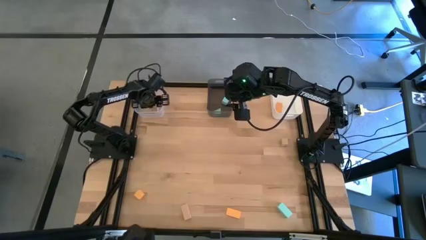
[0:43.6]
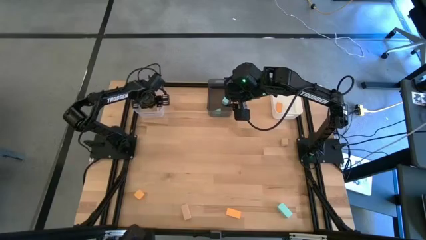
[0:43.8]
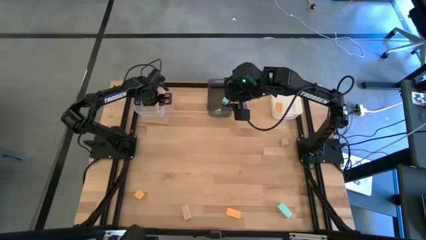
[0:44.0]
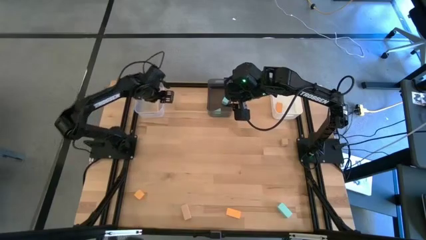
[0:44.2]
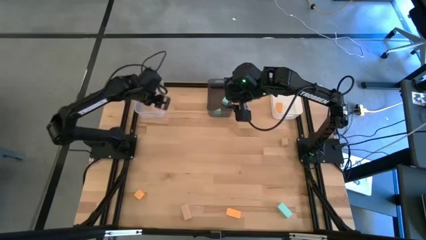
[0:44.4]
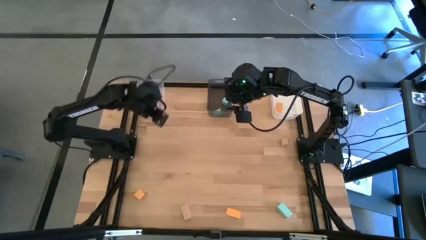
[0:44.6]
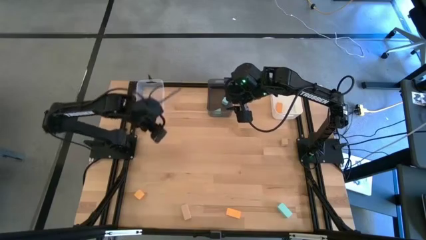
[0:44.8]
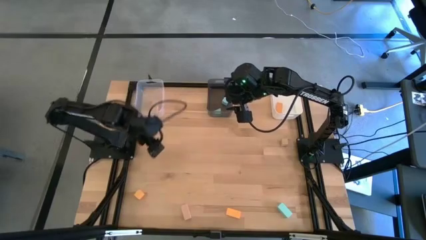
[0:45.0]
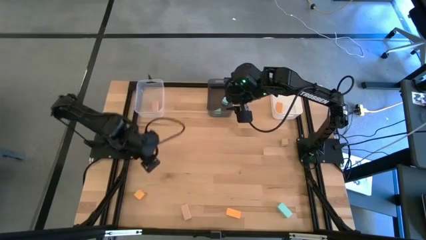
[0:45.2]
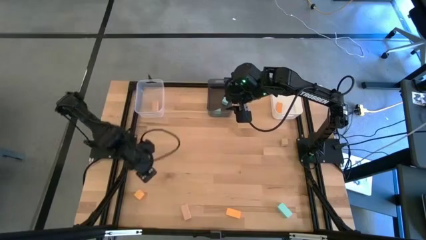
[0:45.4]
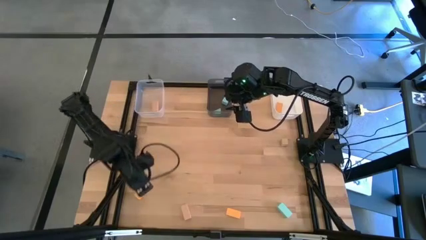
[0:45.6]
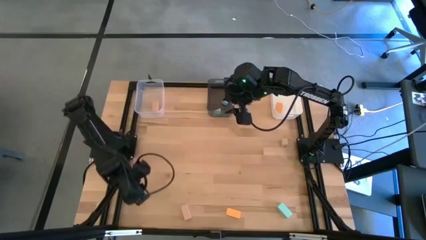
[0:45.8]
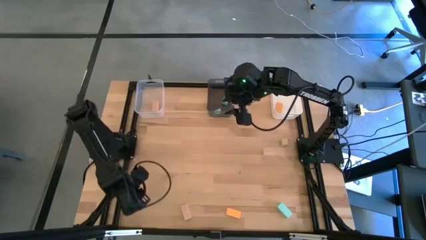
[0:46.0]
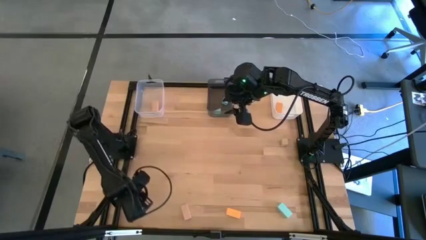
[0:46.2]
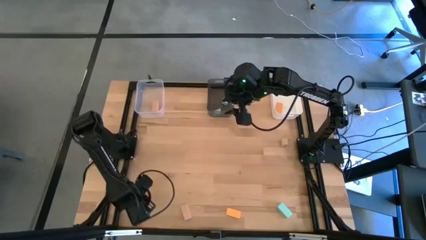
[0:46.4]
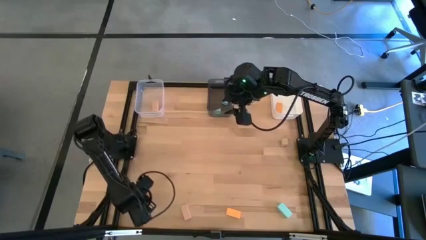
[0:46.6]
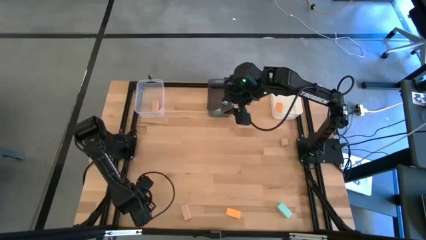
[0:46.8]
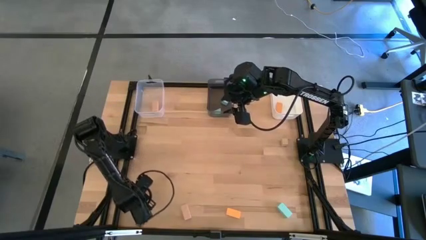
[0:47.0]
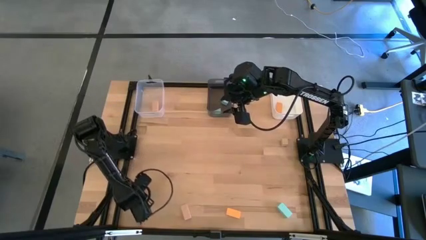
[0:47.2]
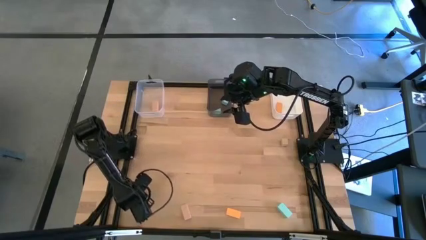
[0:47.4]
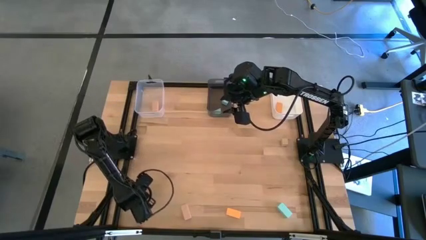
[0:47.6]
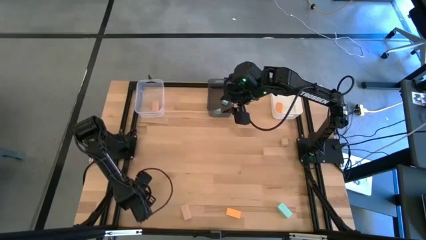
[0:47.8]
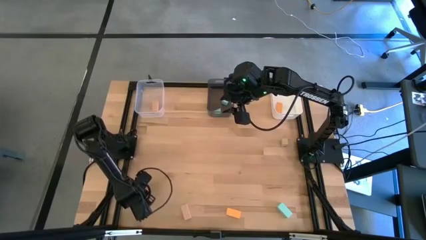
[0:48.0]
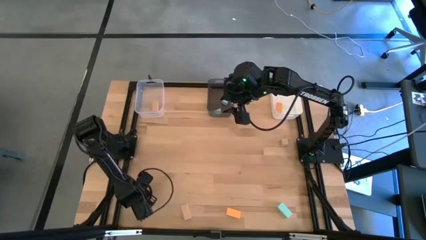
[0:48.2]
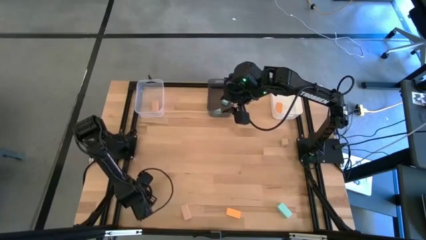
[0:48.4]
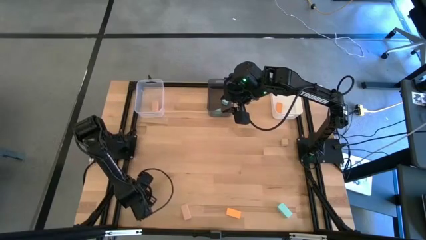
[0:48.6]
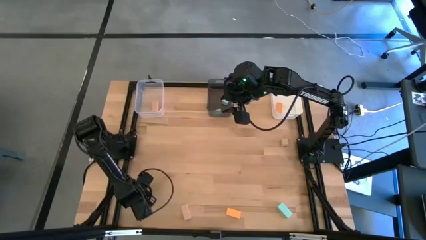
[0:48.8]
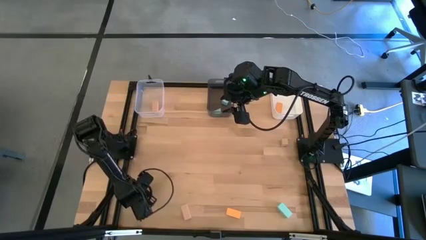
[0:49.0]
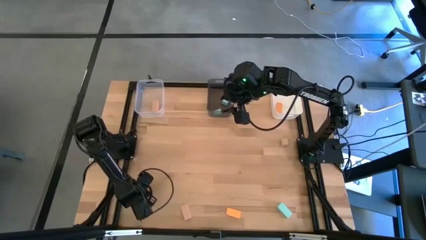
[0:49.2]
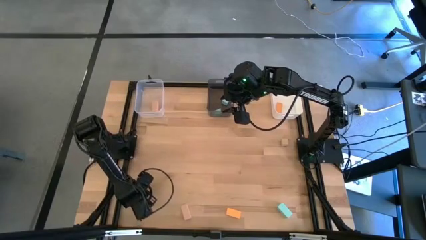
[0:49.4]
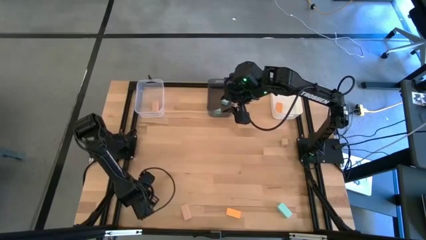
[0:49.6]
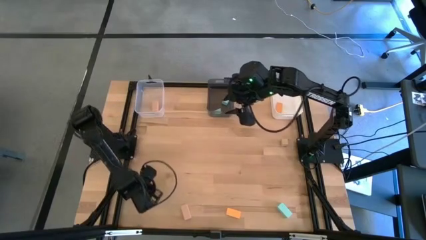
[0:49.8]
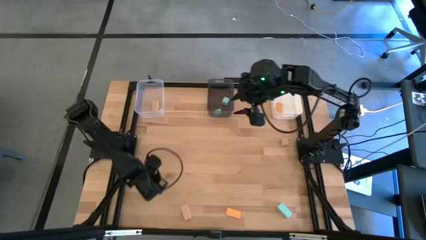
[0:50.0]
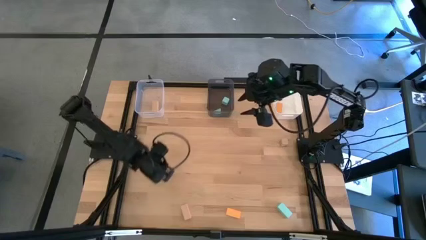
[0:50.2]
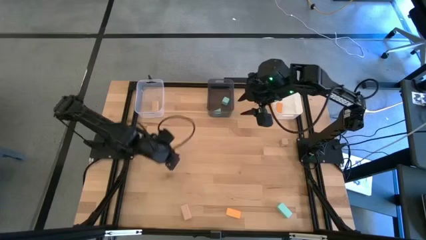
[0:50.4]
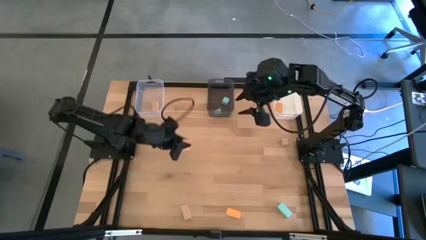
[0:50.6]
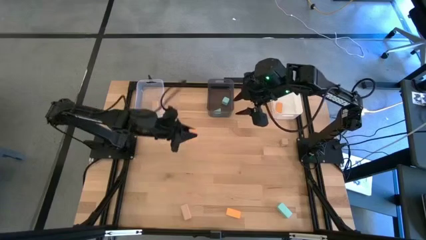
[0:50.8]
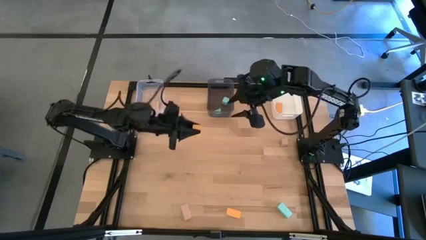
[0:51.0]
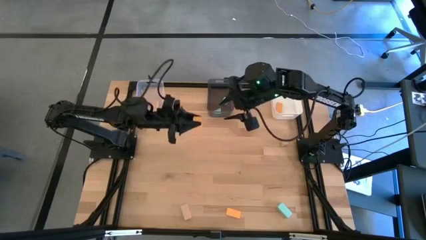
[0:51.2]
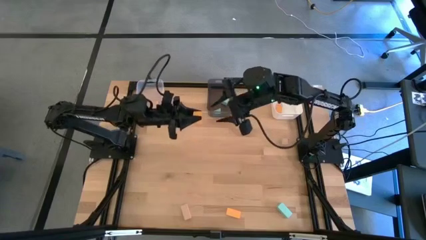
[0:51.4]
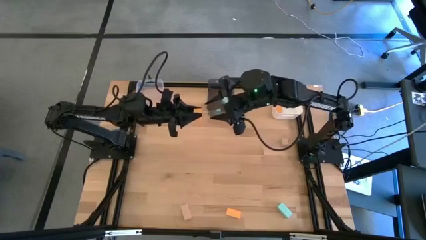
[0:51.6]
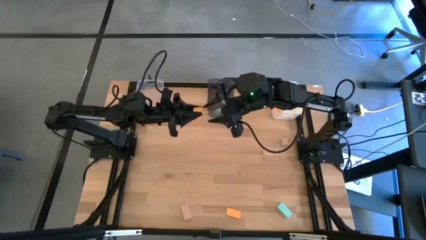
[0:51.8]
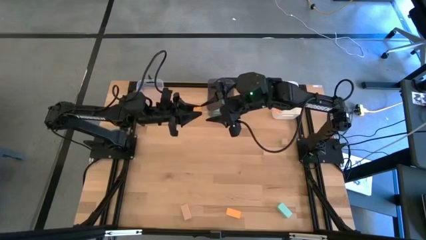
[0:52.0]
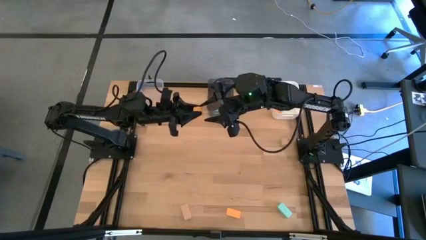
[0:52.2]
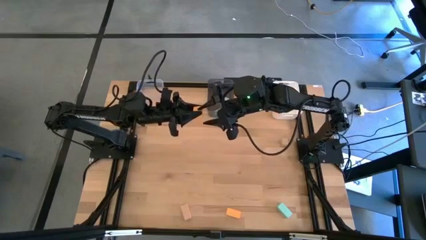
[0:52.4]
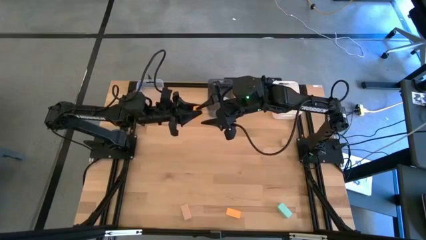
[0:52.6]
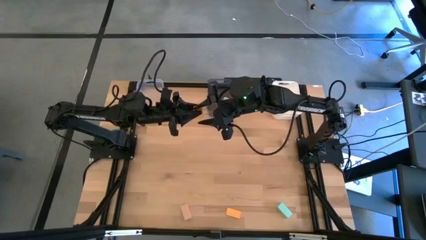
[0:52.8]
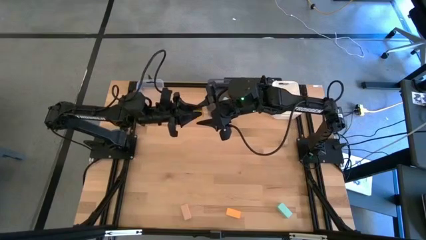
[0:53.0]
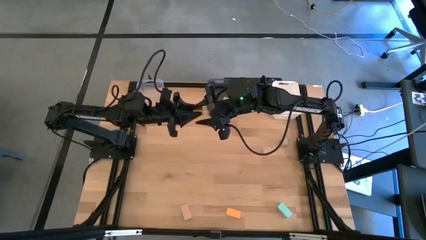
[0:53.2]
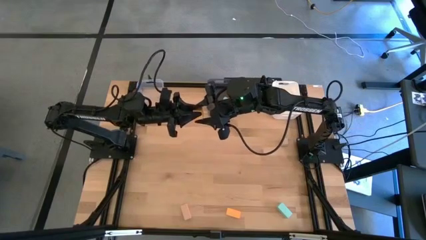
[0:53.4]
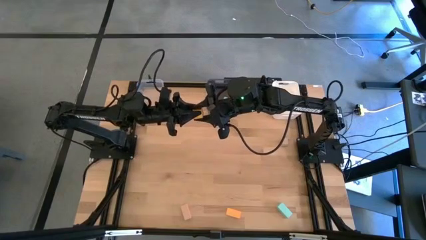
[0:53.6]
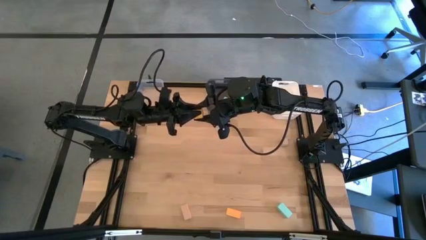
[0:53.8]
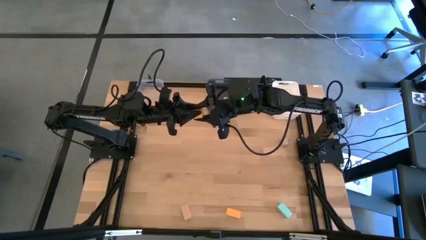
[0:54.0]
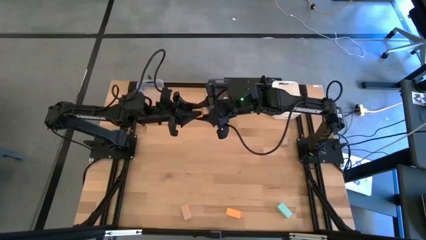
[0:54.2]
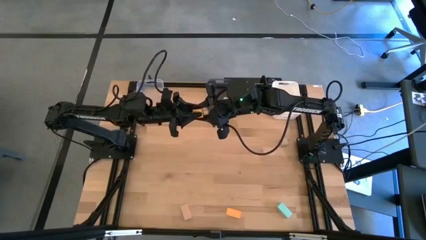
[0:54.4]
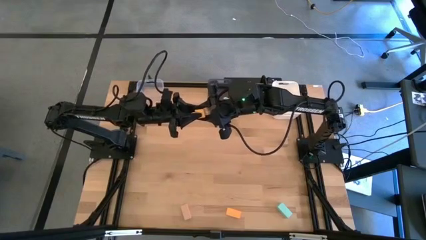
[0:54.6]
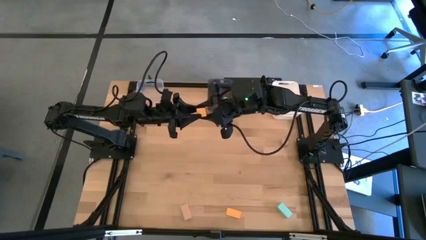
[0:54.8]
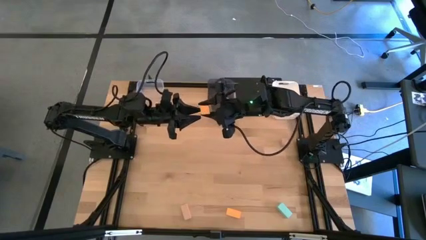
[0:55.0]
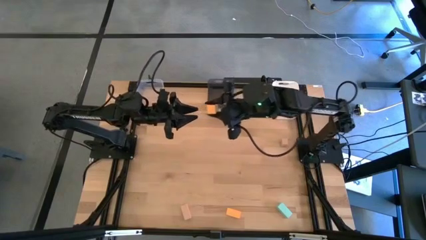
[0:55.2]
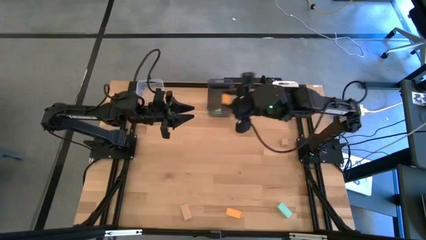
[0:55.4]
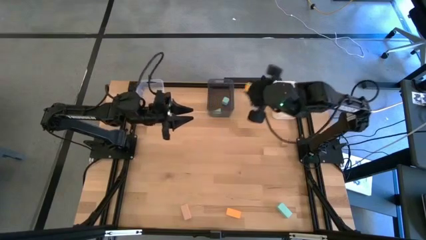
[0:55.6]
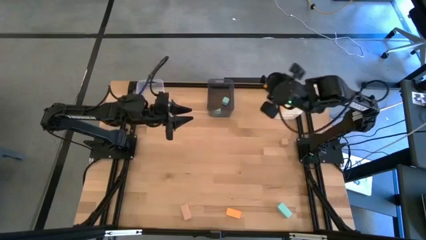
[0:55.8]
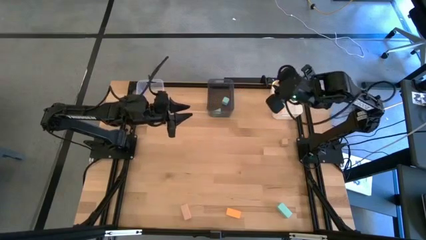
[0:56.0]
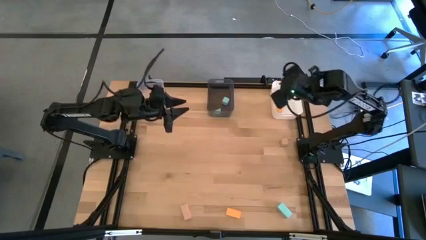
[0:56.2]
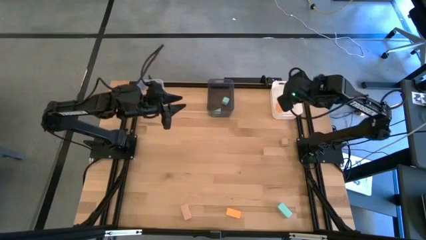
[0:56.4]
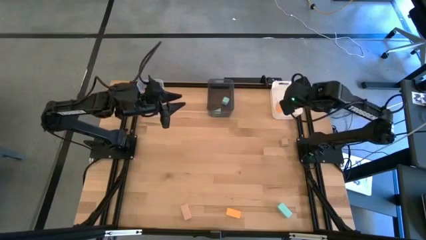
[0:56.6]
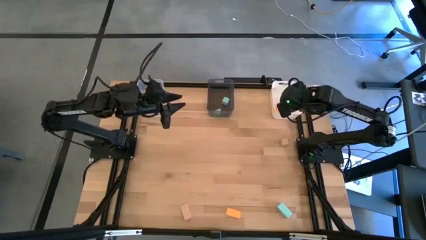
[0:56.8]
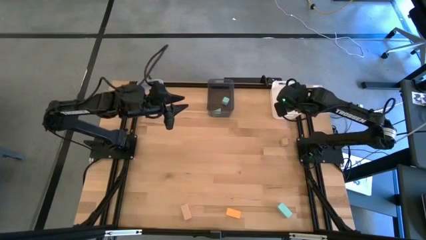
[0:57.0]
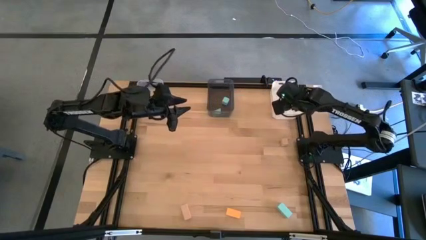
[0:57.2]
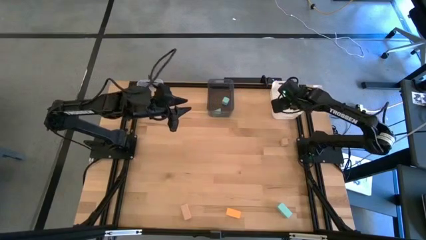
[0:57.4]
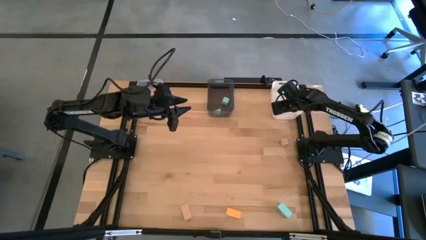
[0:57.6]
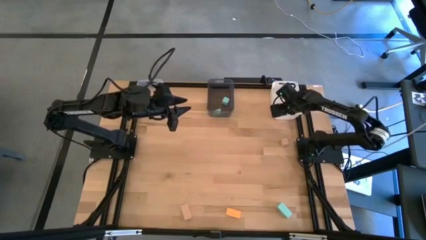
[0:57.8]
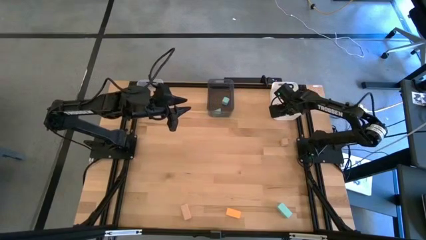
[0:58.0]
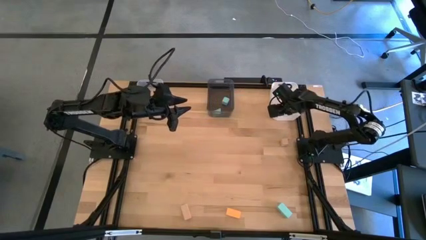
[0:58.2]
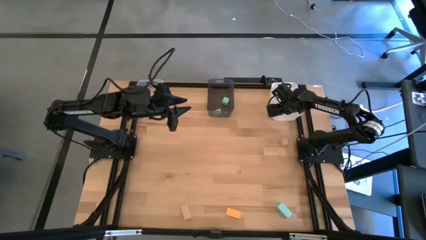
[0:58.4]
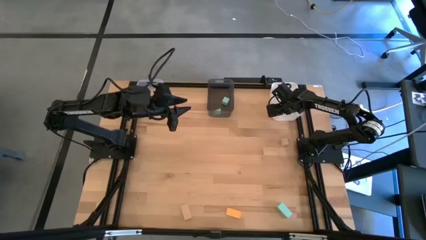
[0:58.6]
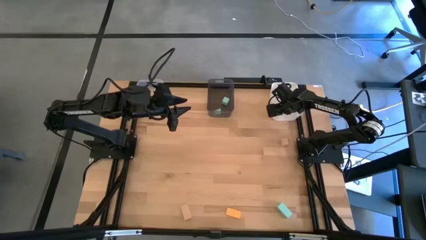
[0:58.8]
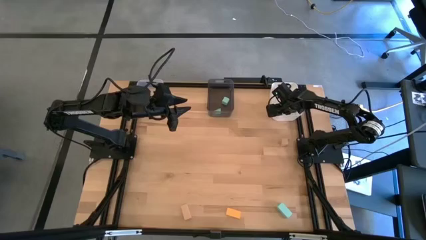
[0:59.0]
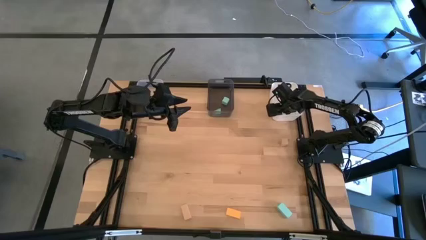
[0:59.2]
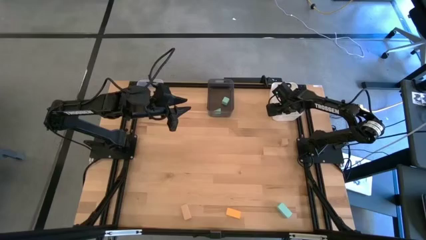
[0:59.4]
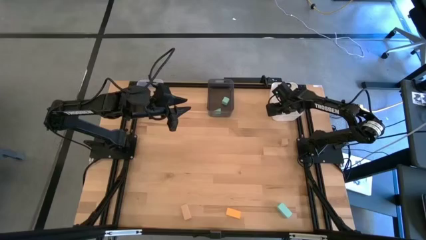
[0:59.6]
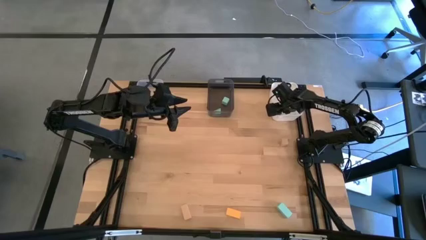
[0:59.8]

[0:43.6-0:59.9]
Task: Sort & place blocks by color
Put the left orange block into the white bin
